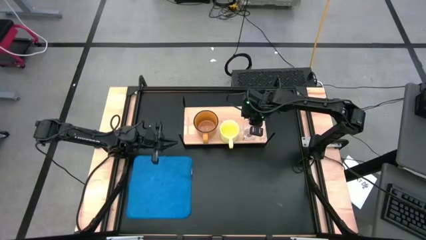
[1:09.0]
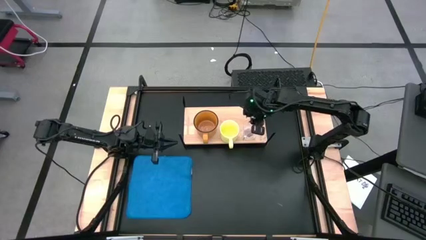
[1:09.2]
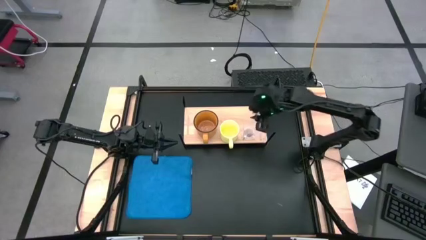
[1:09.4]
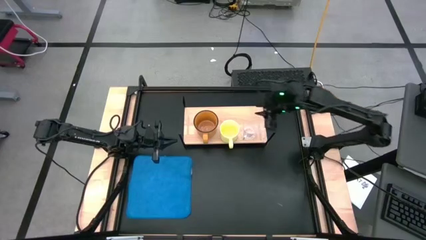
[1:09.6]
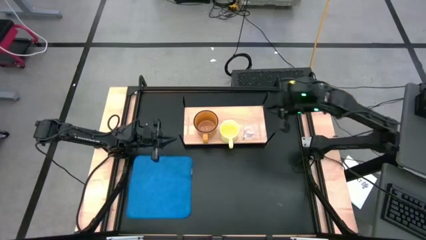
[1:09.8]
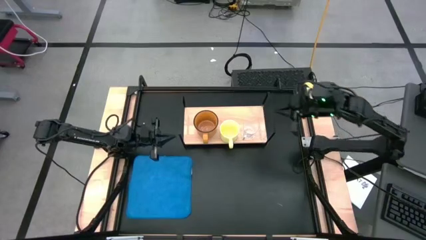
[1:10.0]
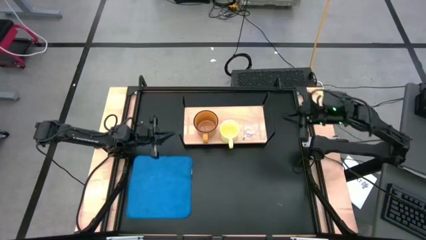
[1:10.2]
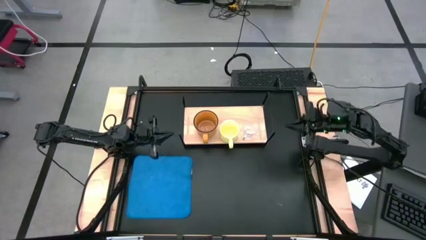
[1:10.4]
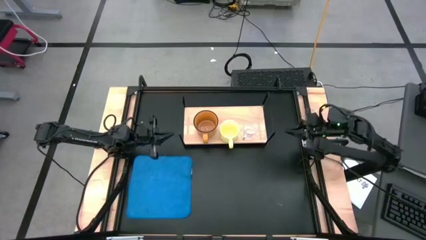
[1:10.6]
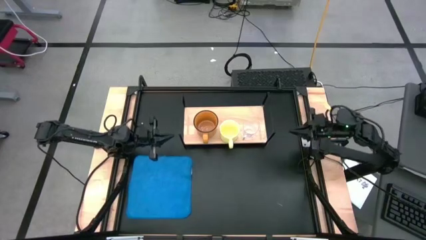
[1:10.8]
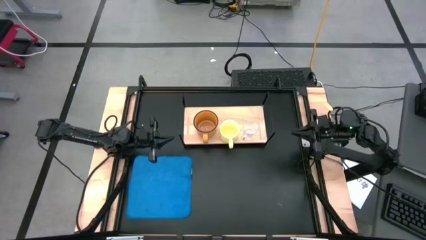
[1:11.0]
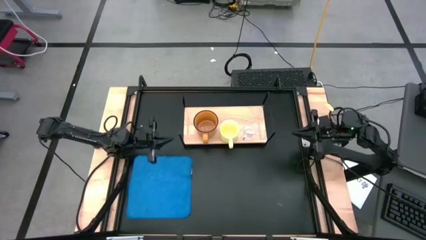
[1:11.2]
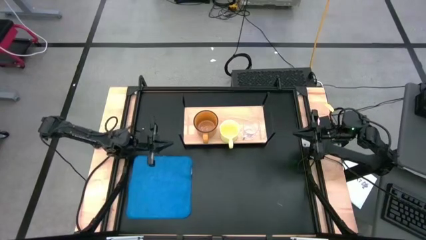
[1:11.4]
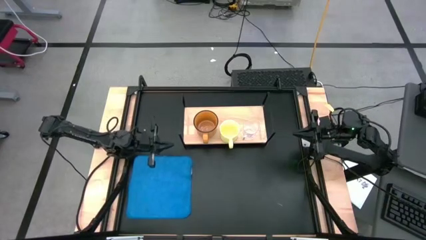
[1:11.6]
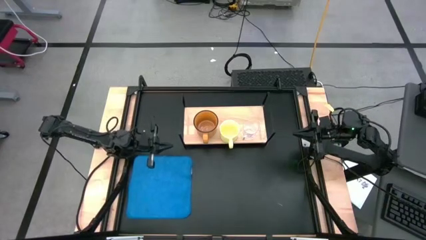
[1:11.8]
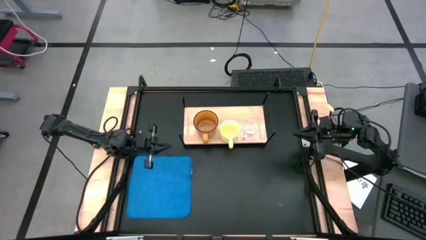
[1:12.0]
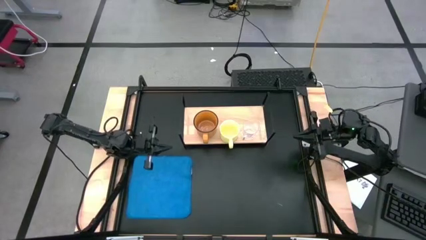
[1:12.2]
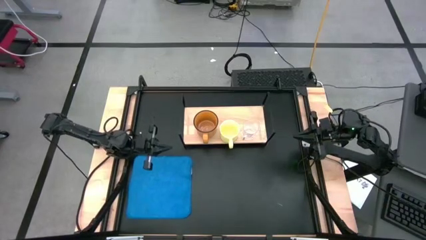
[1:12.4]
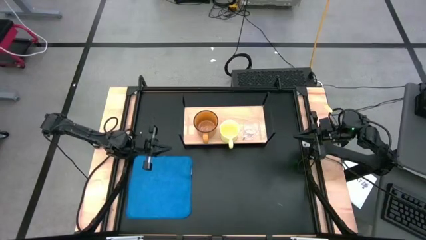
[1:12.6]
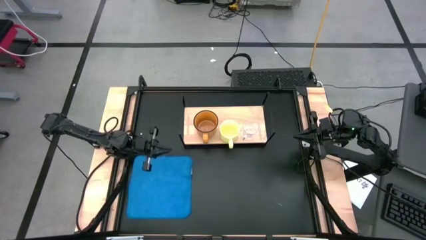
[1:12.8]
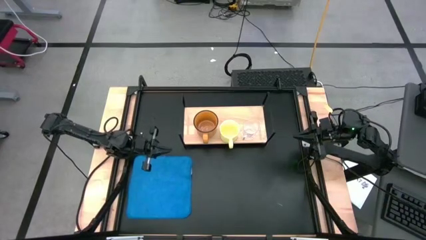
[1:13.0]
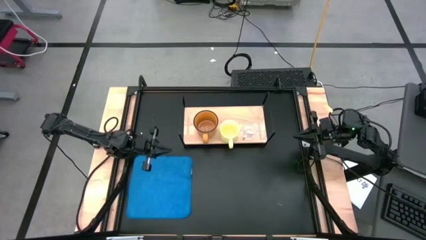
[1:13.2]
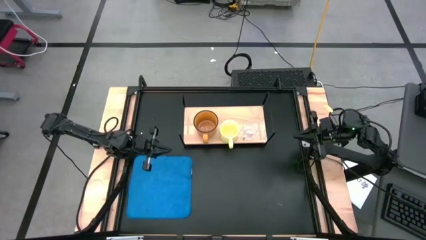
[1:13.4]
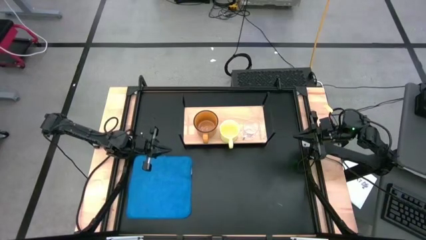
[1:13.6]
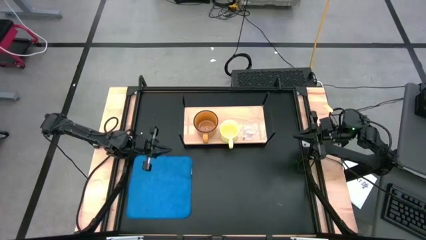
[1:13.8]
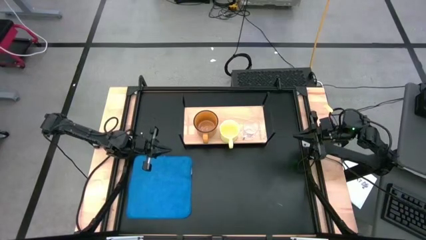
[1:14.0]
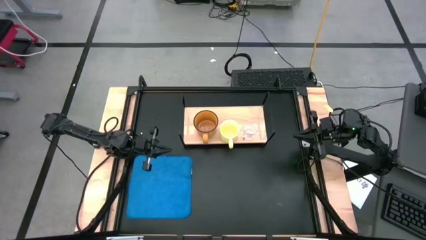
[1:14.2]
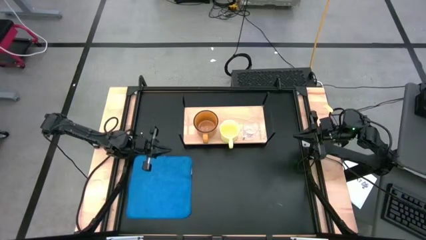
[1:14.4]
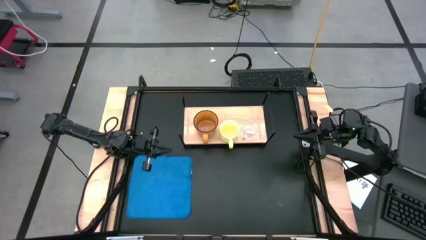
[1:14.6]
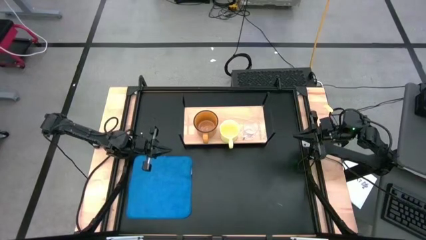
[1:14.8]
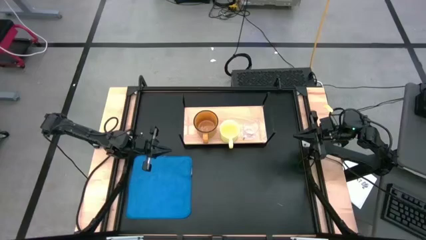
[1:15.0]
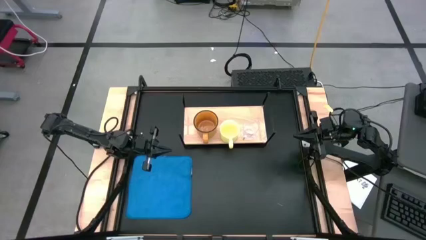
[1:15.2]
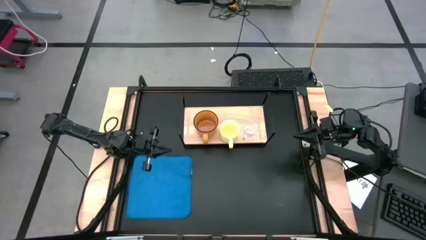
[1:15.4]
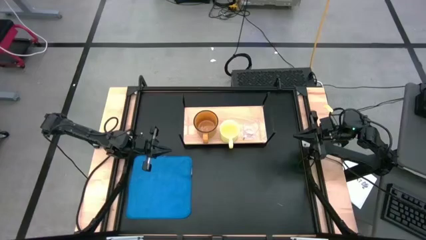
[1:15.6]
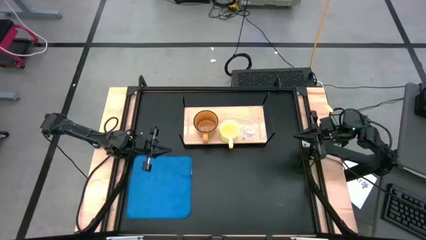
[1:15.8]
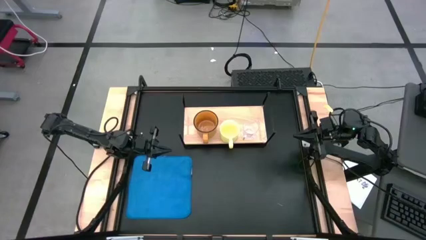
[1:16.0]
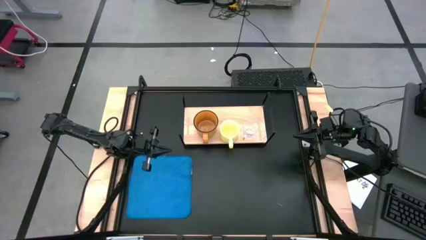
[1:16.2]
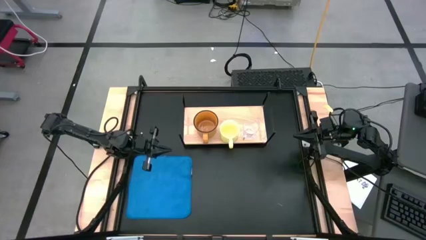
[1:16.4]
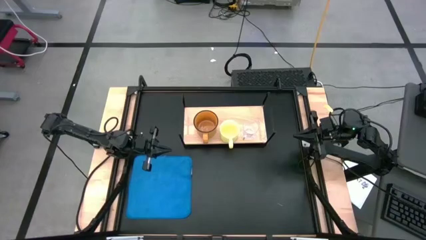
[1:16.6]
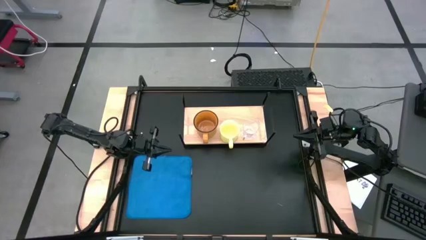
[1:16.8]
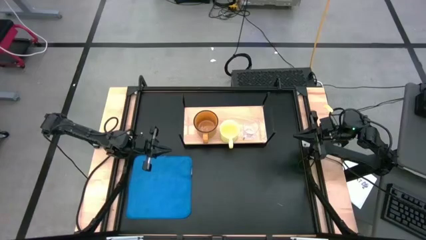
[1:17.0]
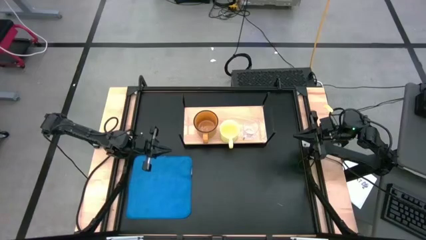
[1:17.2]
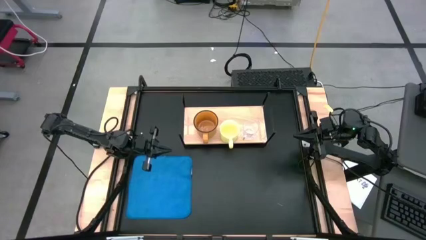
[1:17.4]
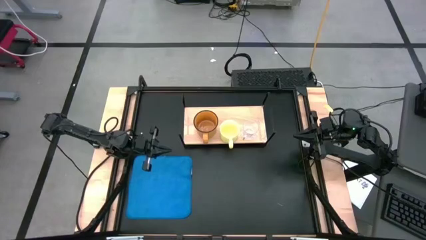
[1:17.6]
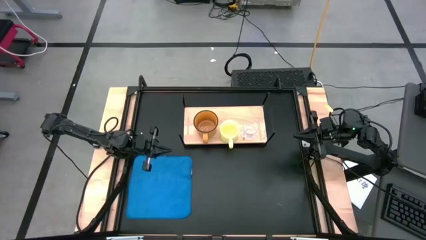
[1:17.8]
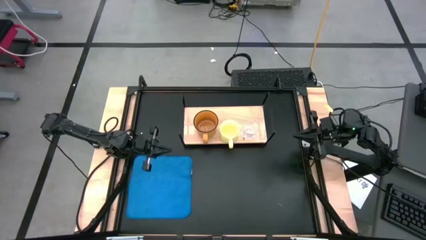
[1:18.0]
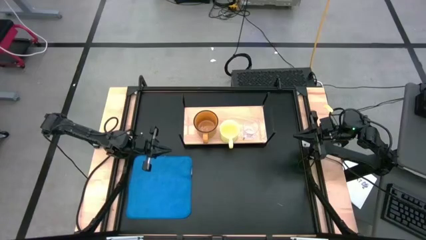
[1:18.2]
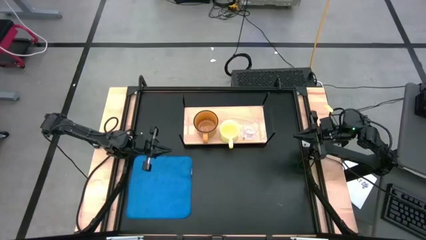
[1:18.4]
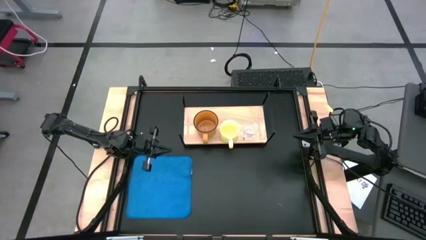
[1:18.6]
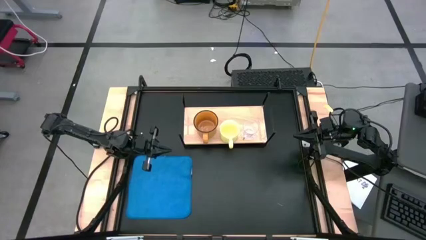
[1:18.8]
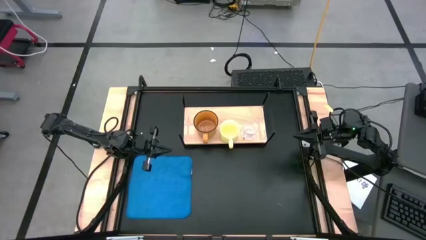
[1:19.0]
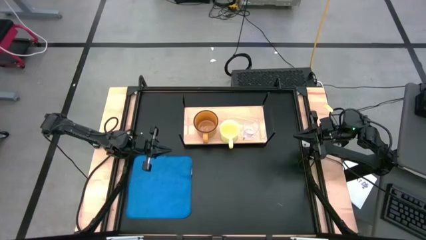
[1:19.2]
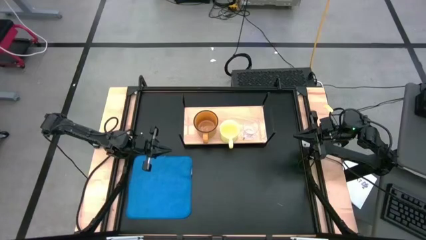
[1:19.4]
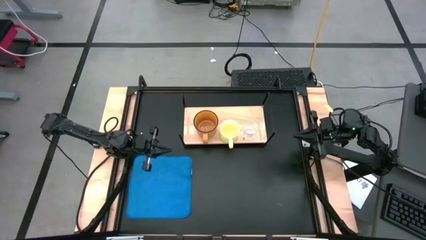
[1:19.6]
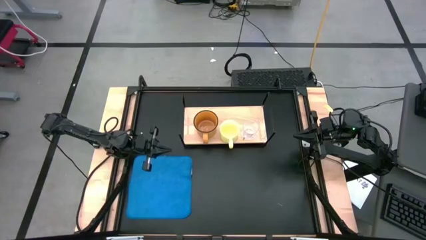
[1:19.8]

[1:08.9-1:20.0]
Task: Stack small to large cups/mugs on shelf
Return to Home Position

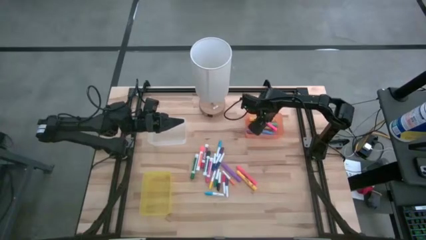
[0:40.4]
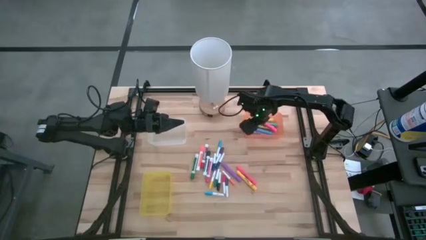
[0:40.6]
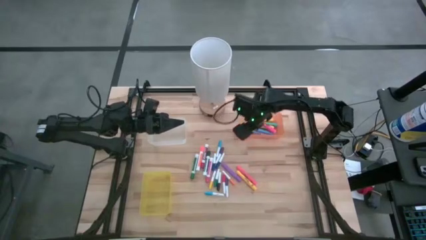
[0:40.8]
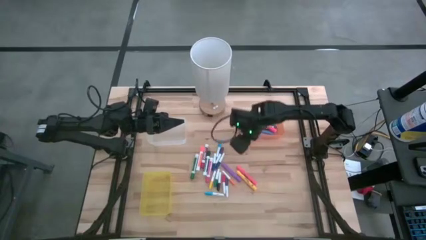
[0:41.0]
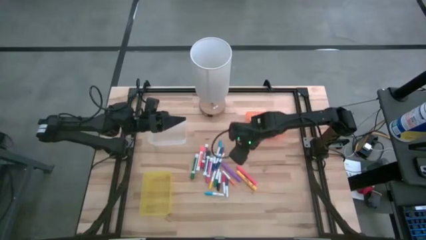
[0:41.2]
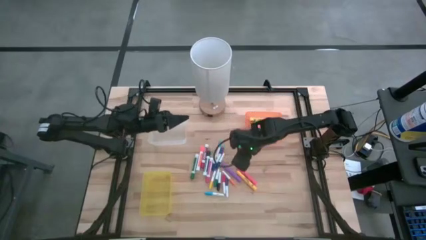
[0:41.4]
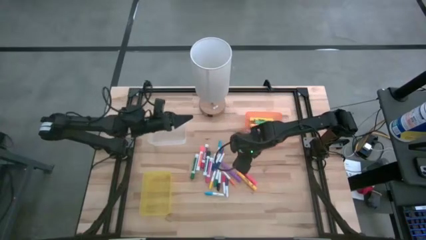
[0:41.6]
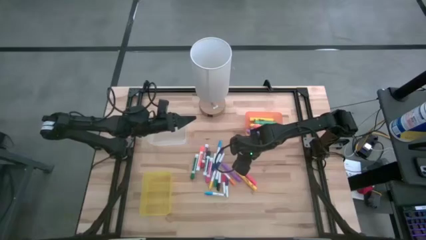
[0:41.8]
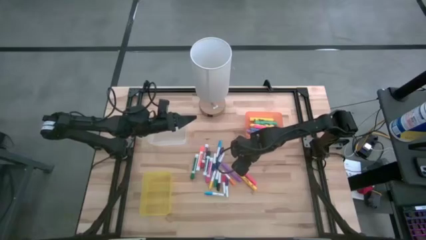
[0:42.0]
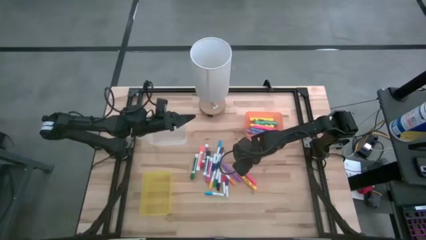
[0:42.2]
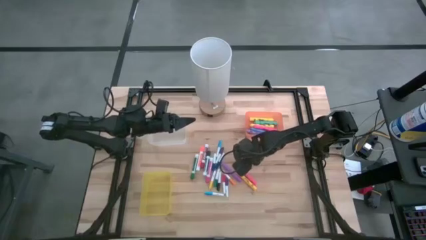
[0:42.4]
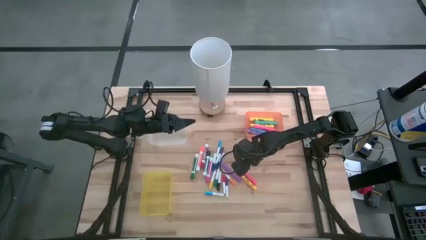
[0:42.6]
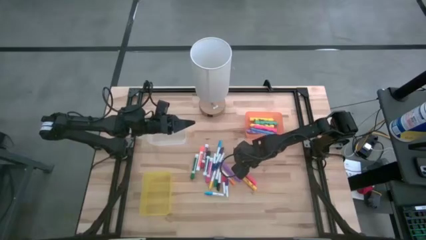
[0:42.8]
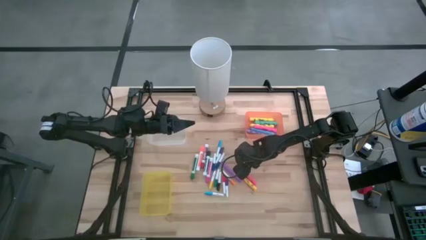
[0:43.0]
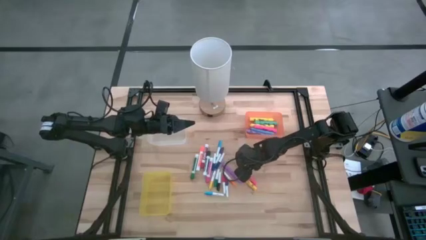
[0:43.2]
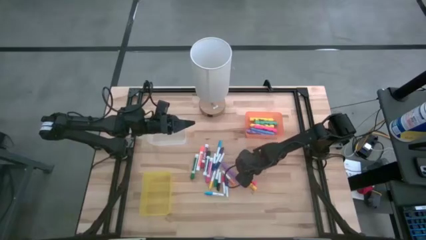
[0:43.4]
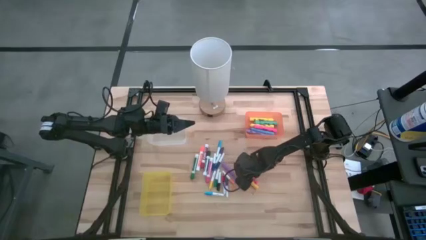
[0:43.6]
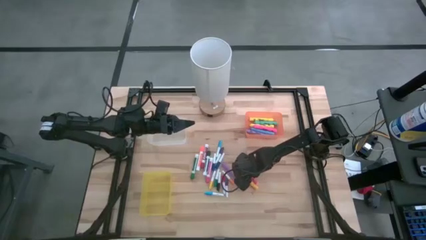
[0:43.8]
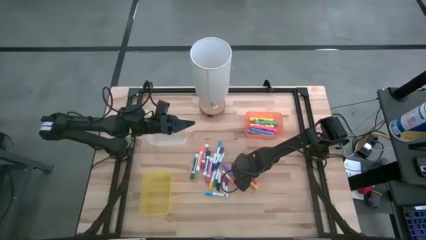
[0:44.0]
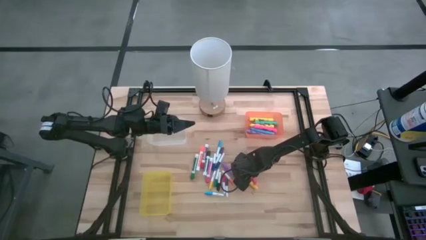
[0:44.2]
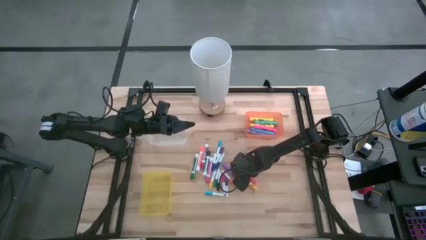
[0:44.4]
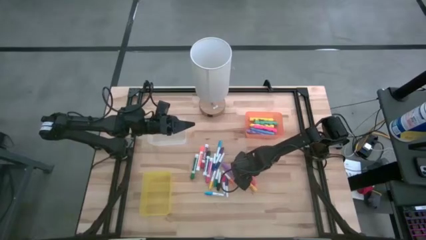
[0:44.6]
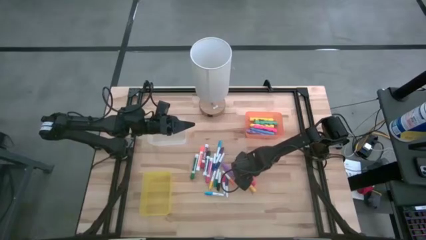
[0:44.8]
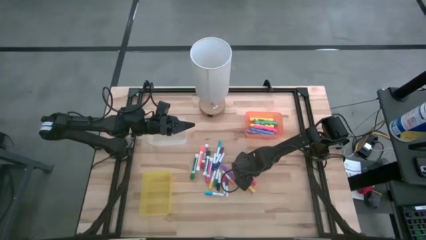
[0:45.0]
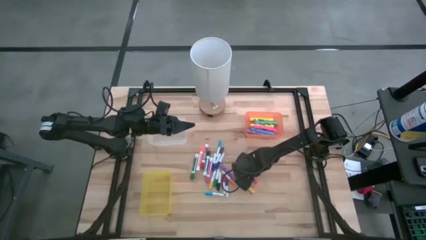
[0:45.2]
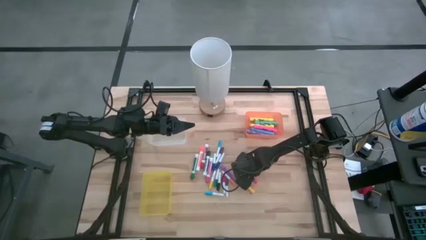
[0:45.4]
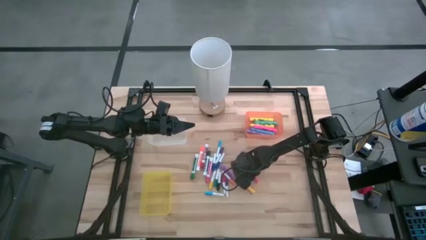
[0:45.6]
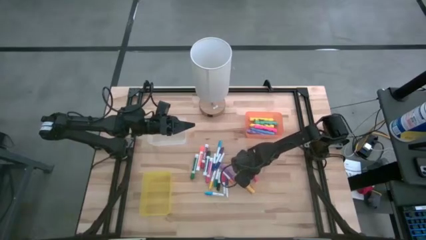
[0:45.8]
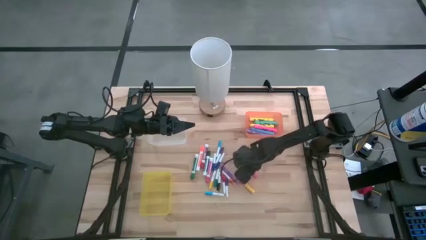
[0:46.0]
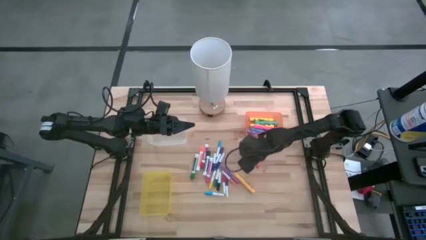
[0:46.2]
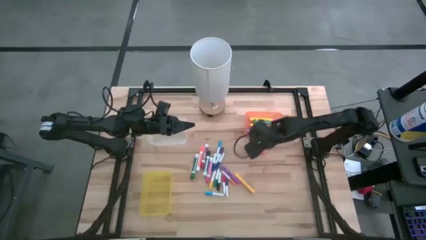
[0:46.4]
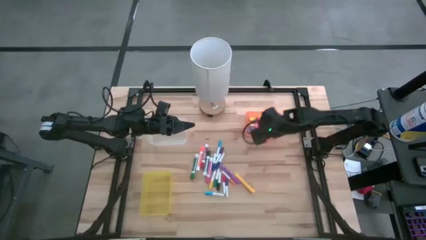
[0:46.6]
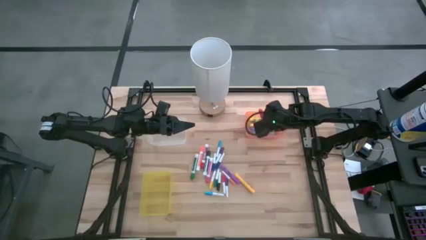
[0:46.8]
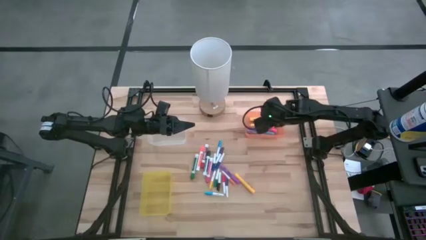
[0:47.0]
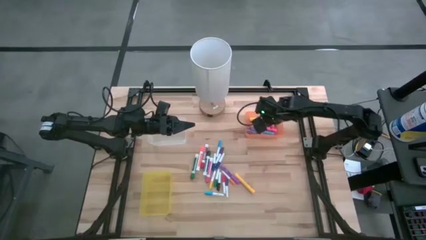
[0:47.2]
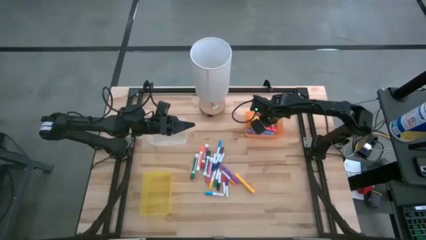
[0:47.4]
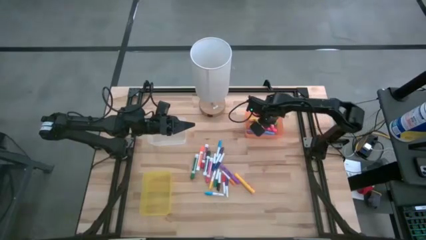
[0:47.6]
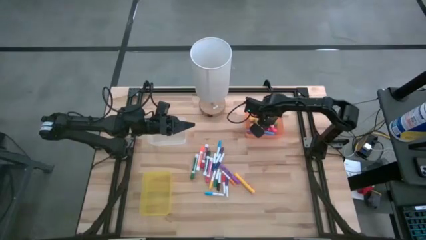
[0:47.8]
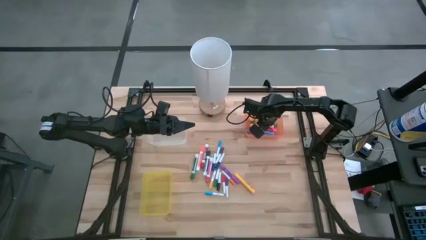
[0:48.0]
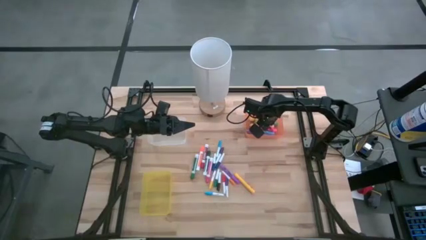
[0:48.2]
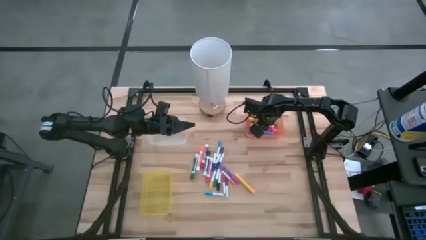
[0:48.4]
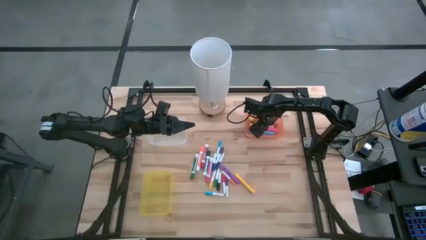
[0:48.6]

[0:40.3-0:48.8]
Task: Pick & Place Markers
Put the pink highlighter pen into the orange bin
